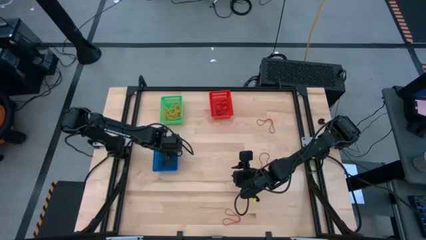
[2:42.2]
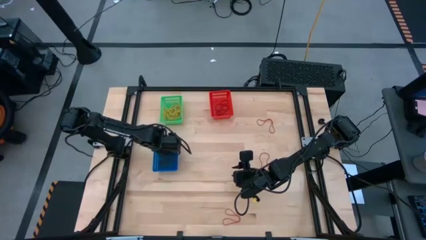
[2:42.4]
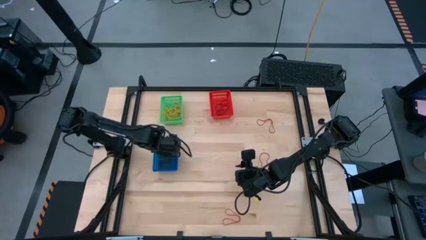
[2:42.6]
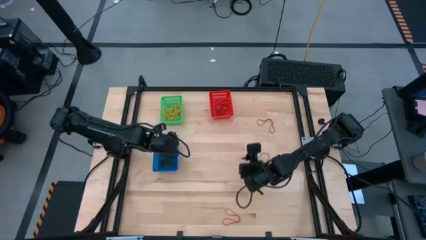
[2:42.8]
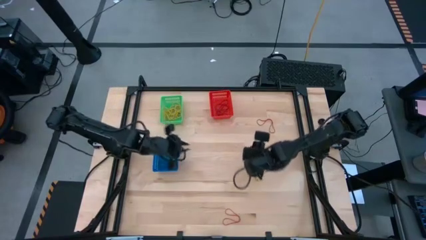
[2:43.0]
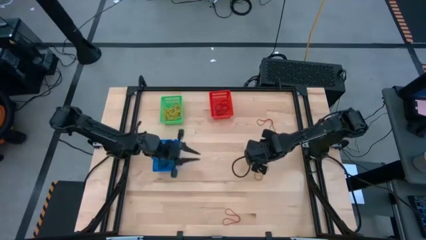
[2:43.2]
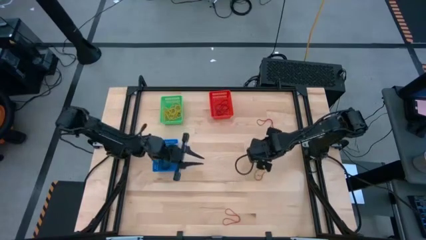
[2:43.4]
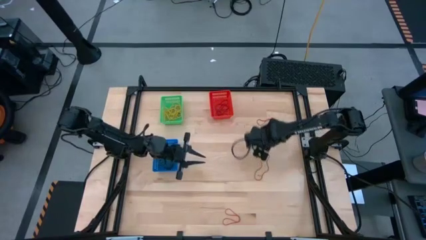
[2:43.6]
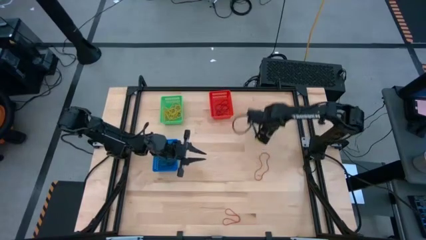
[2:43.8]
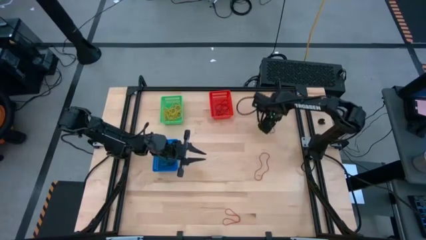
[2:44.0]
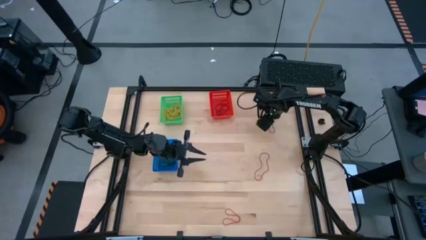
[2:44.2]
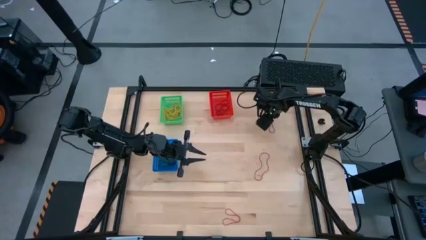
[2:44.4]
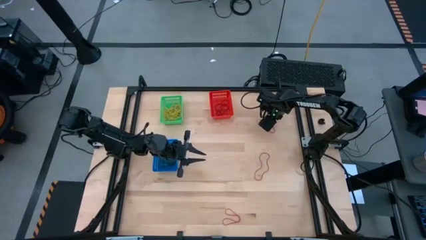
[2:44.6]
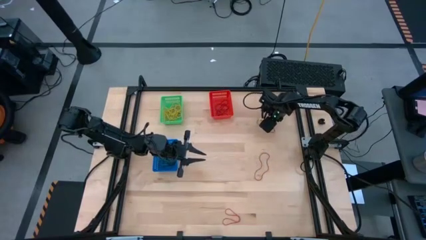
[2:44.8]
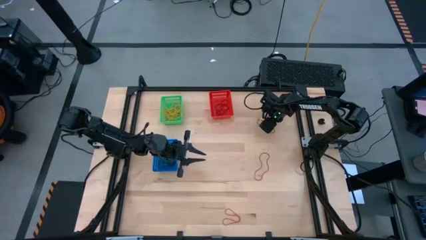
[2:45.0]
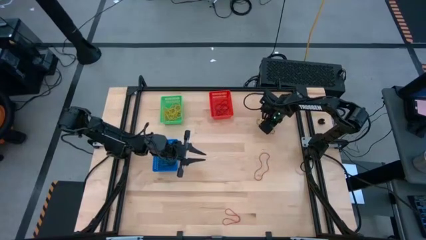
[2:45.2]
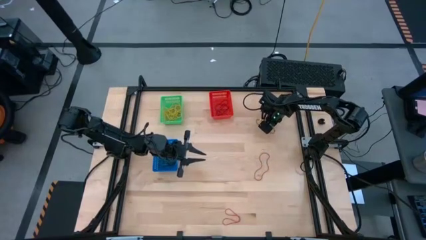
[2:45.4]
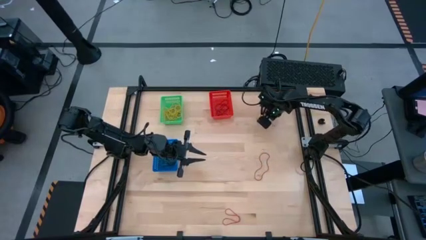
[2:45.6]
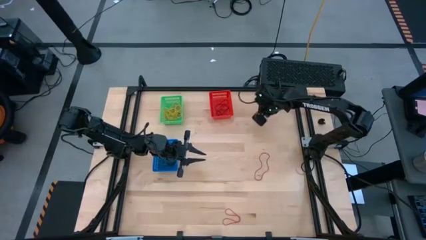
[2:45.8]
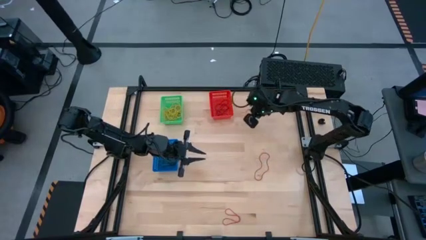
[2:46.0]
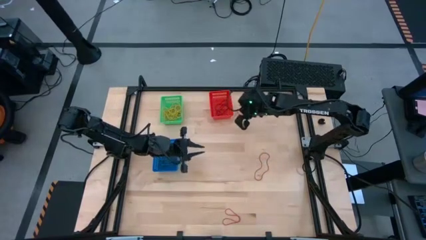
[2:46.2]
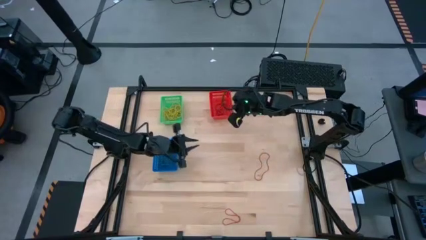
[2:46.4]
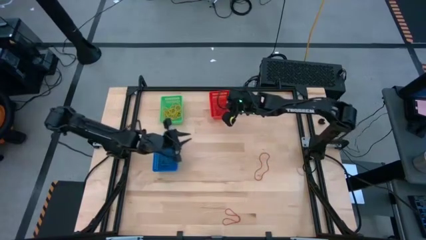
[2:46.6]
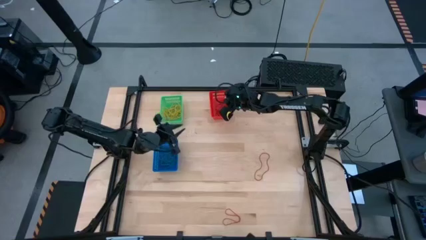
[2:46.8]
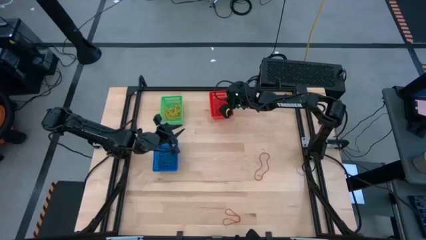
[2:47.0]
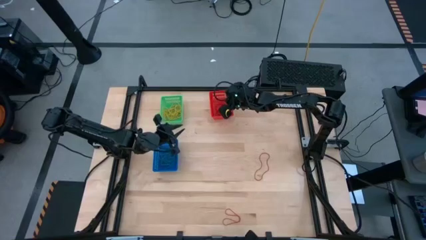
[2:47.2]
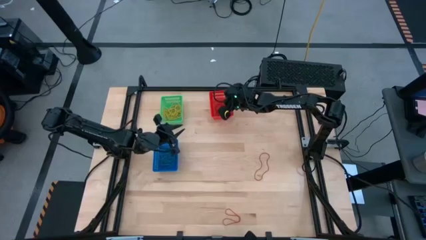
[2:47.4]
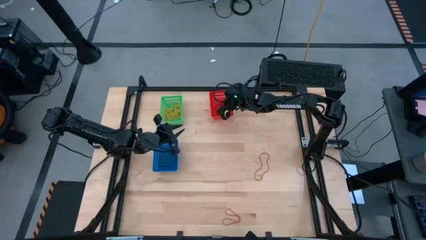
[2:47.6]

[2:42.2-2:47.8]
Task: Sort rubber bands into baskets
Put the red rubber band into the red bin

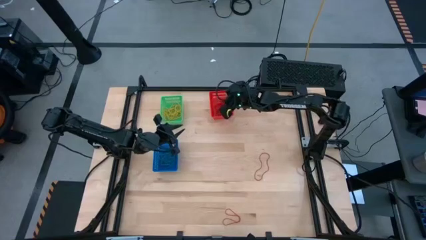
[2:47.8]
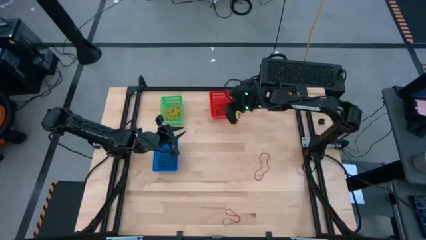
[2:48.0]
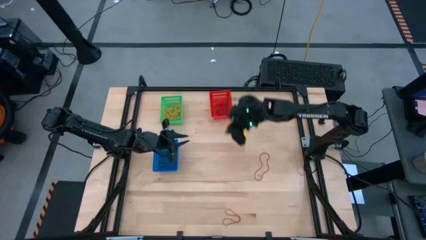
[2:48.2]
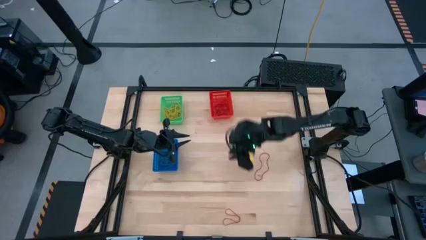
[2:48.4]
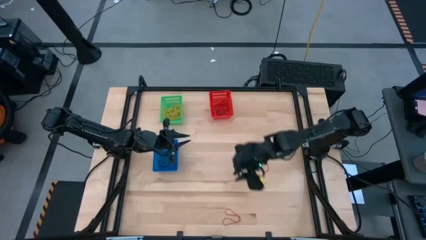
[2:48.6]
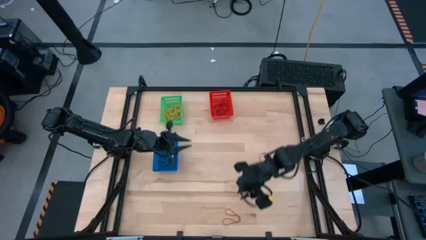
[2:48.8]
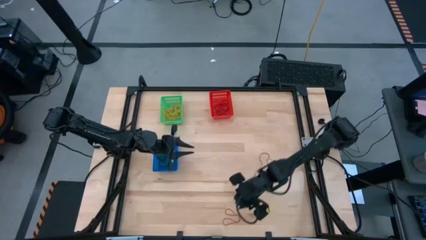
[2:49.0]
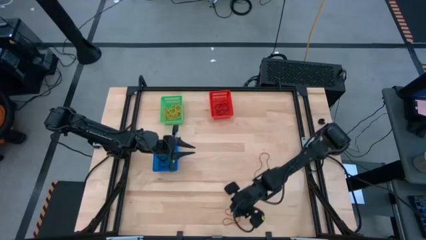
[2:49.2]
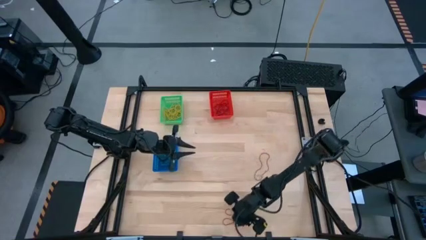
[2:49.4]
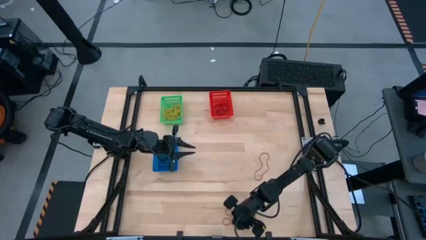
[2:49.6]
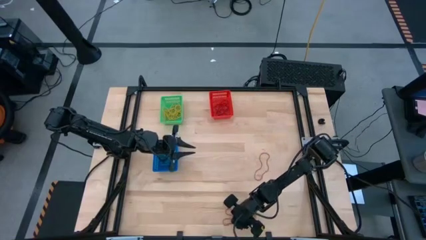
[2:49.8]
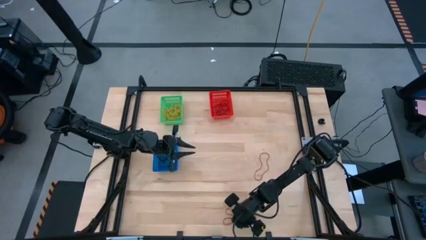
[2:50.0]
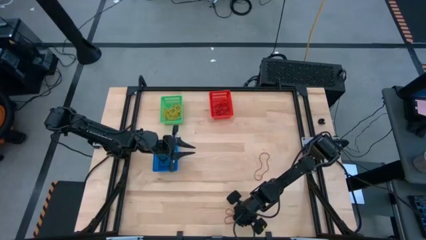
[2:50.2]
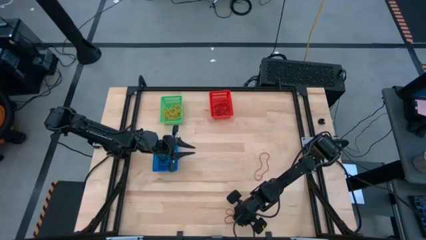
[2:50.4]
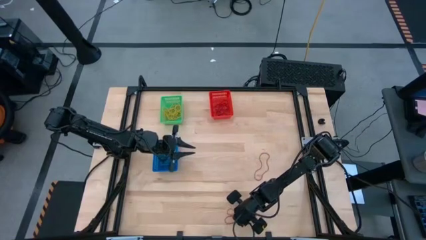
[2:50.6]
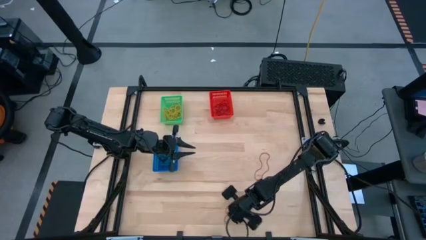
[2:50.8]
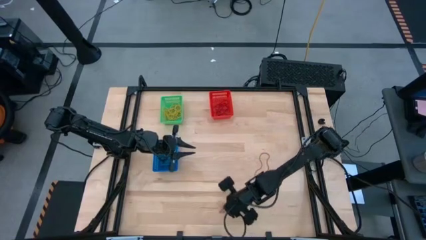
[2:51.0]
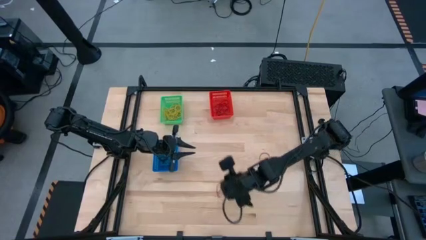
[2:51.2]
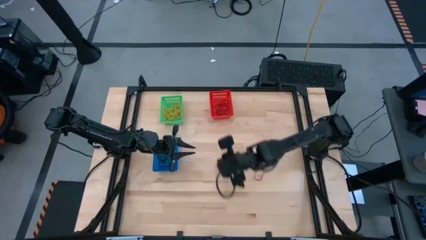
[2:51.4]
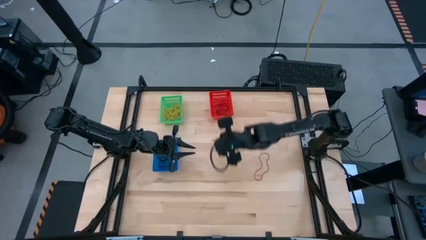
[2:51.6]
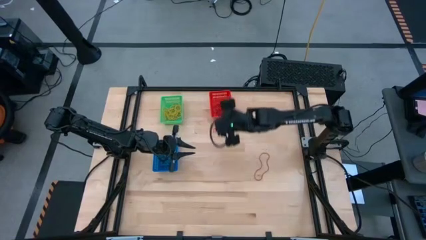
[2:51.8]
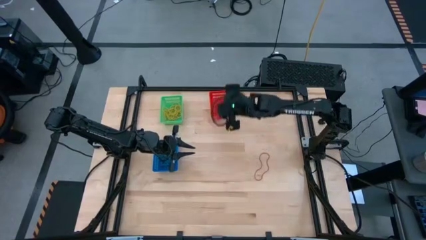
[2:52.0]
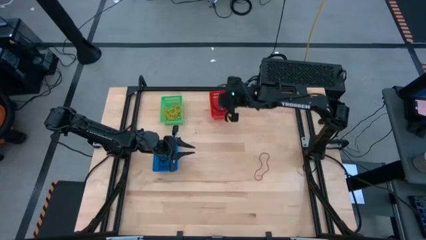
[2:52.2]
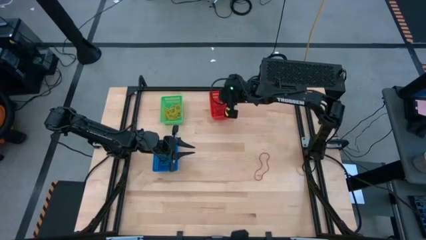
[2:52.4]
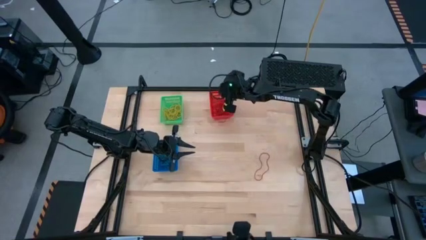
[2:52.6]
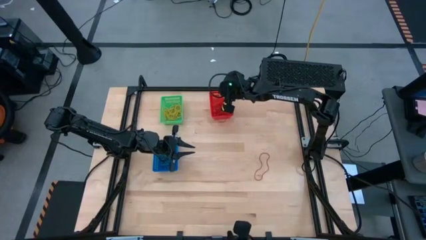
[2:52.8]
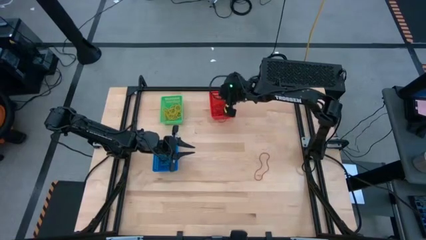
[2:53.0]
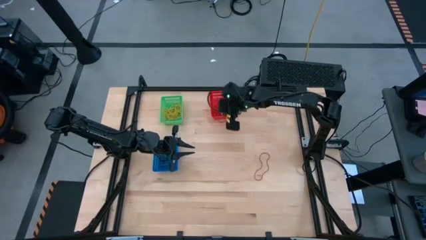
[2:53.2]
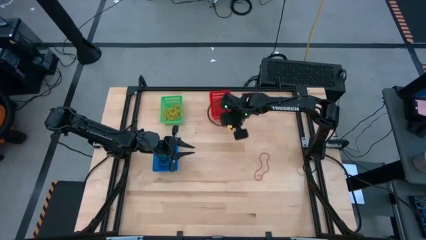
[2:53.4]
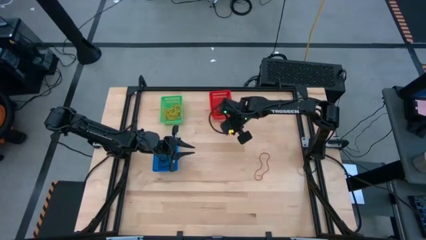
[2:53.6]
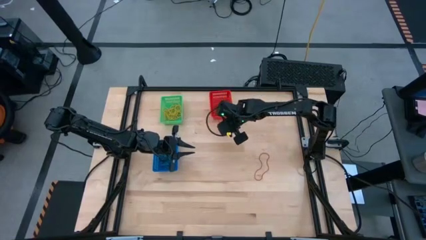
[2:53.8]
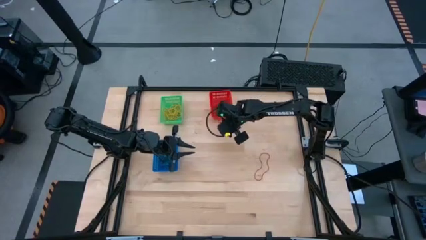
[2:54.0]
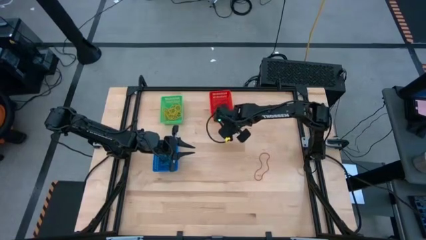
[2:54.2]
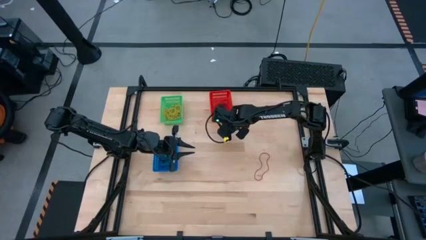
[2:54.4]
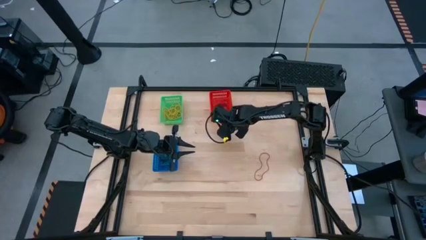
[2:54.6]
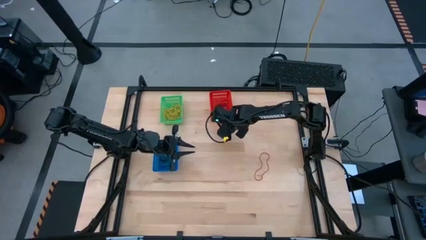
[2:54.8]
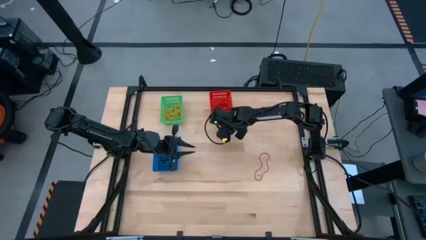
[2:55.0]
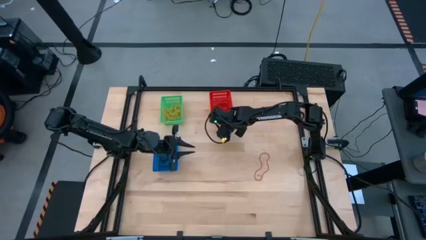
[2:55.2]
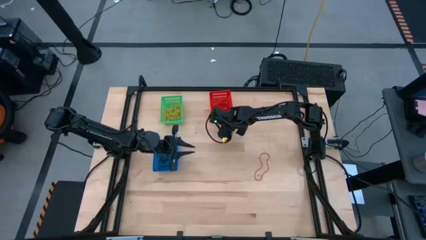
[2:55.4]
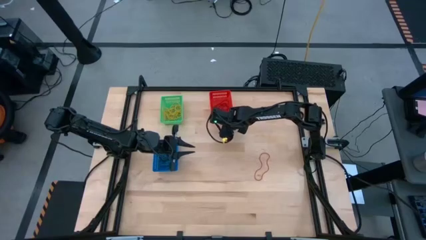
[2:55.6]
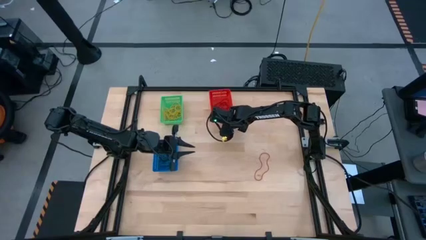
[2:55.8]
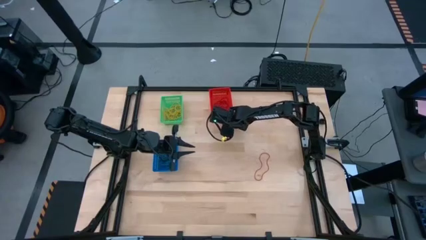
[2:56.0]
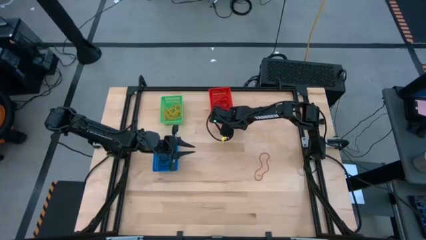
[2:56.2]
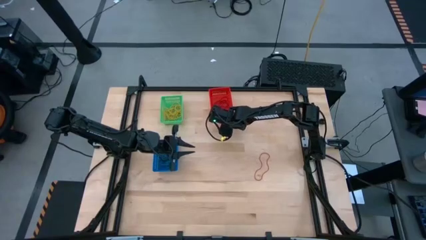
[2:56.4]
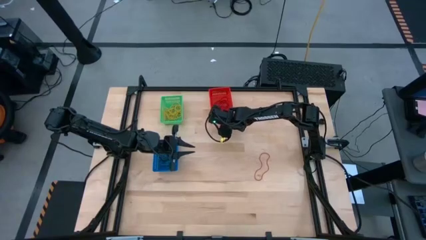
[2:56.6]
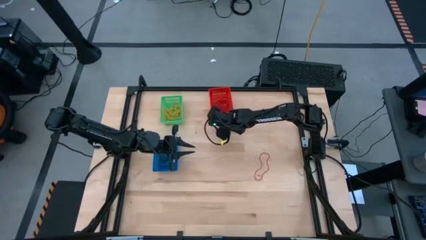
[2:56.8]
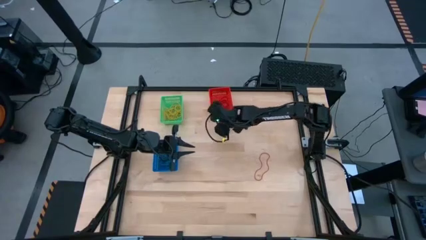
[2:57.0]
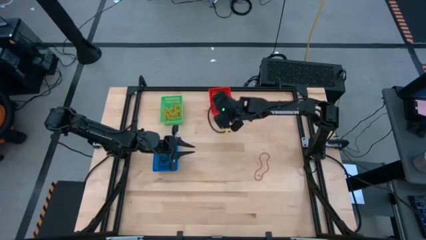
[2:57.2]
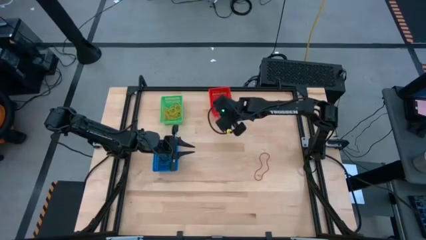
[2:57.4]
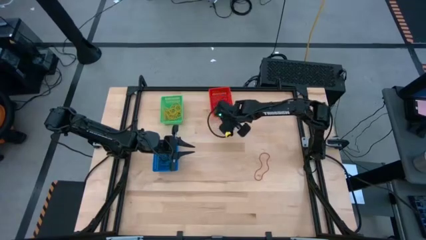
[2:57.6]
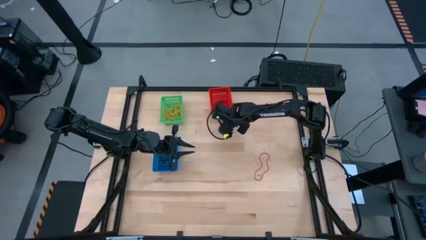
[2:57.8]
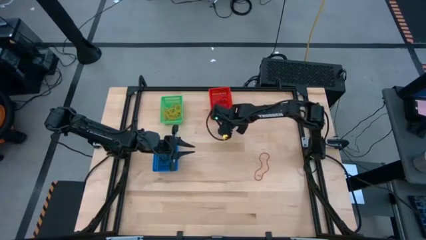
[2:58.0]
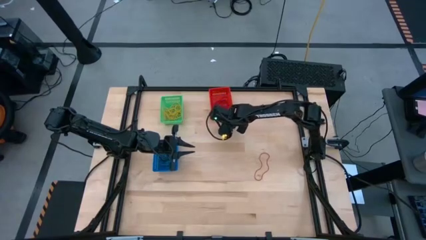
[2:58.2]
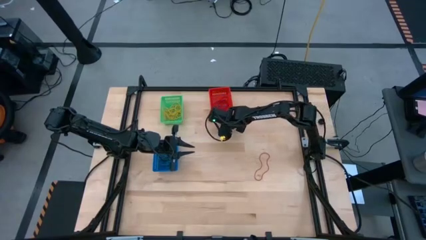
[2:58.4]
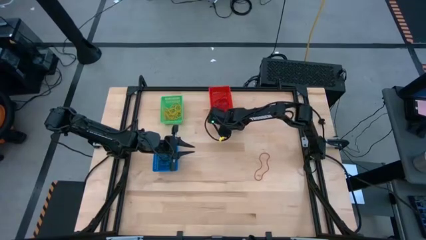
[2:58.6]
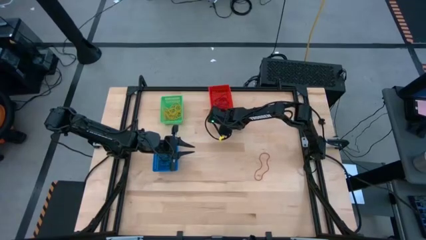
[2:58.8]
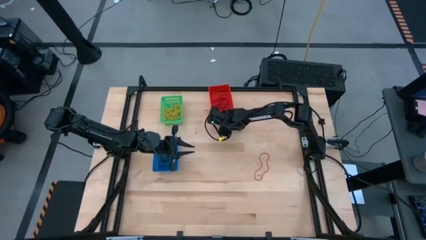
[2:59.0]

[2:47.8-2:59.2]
Put the red rubber band into the red bin

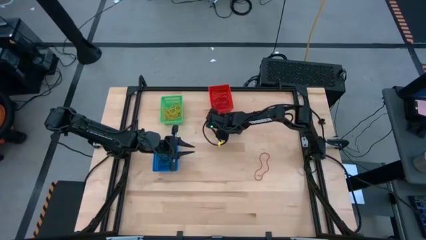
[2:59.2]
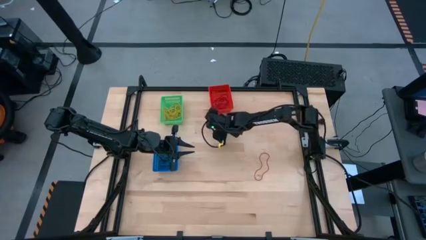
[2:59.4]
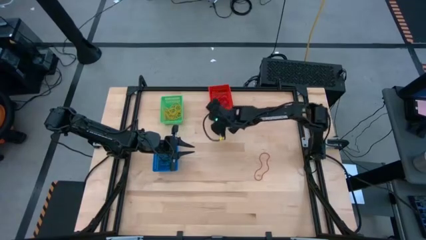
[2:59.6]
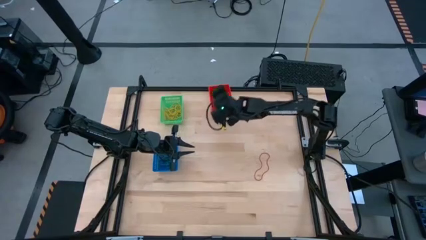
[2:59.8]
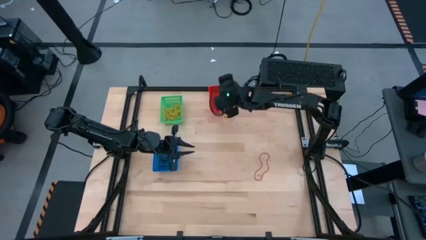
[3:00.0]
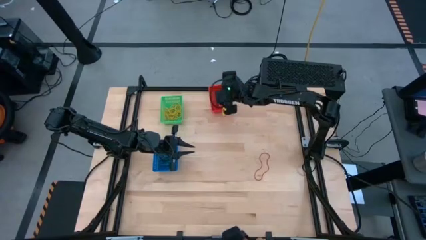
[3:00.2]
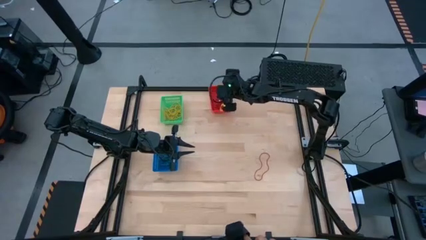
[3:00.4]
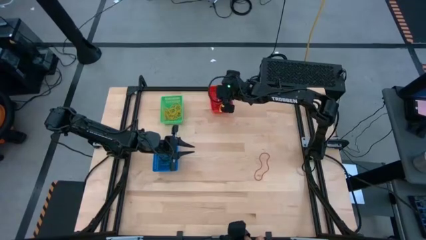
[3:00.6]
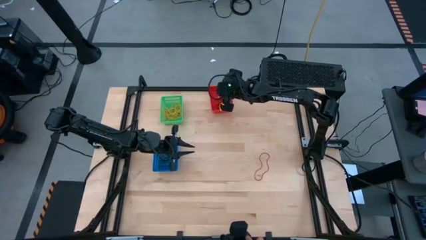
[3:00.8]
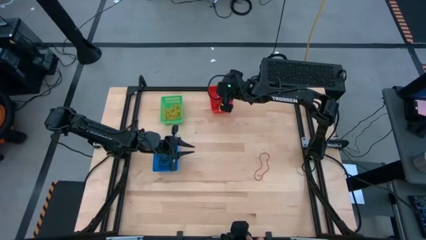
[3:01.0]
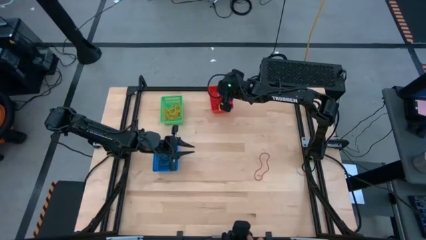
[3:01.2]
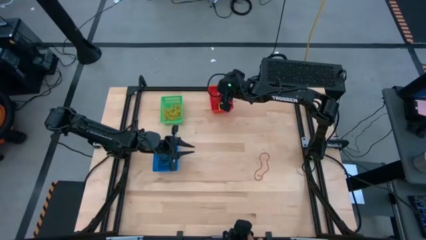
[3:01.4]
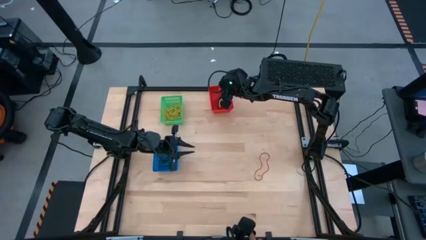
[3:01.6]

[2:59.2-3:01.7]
Put the red rubber band into the red bin
